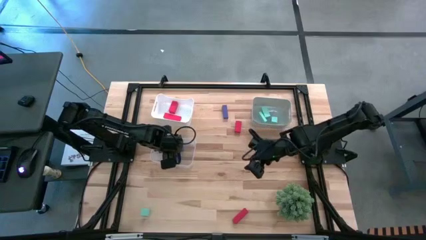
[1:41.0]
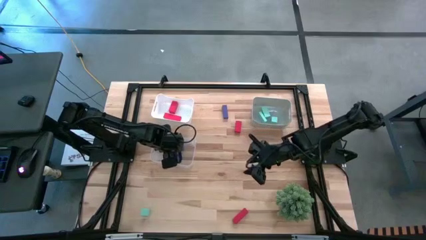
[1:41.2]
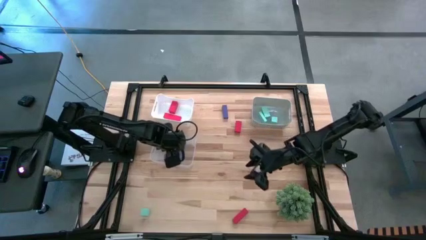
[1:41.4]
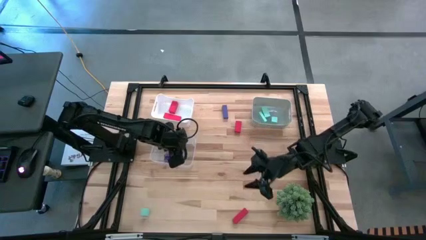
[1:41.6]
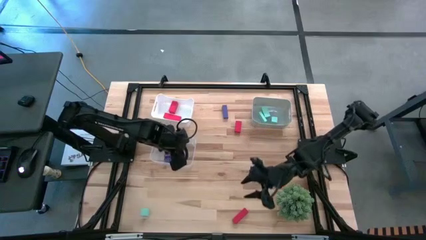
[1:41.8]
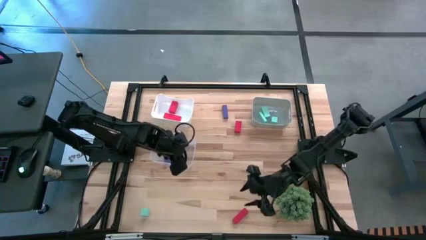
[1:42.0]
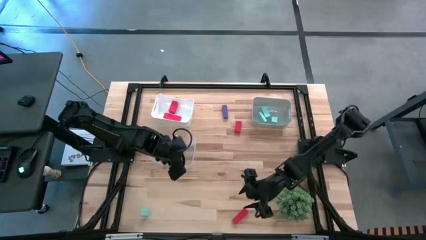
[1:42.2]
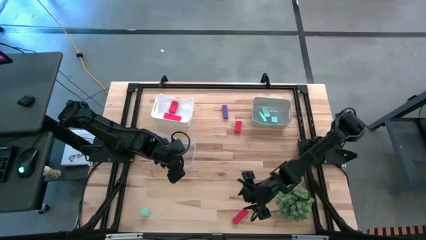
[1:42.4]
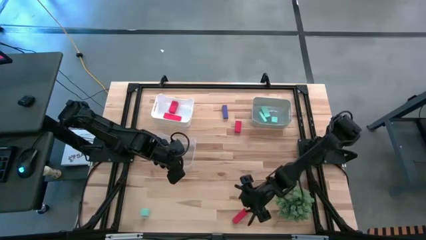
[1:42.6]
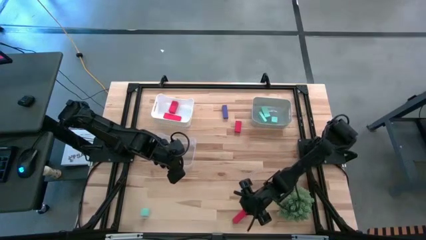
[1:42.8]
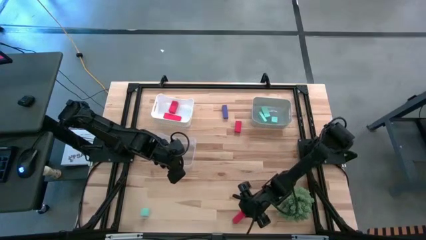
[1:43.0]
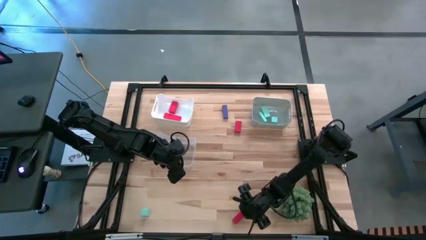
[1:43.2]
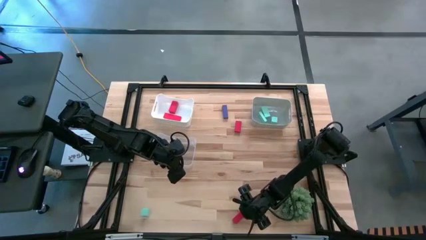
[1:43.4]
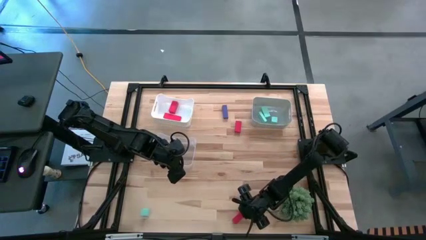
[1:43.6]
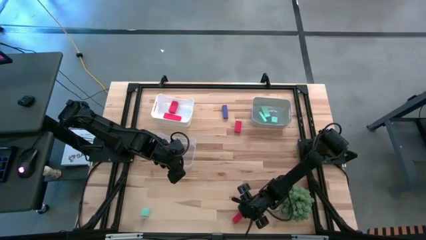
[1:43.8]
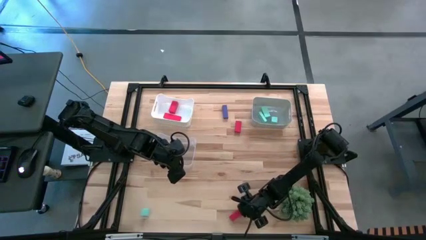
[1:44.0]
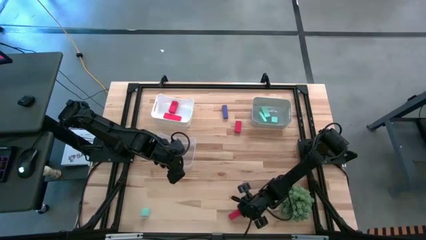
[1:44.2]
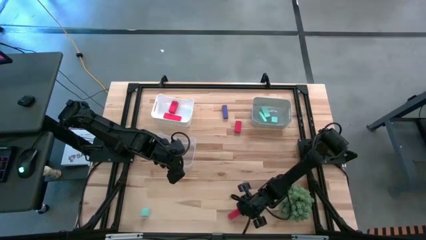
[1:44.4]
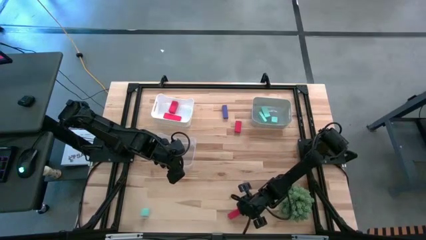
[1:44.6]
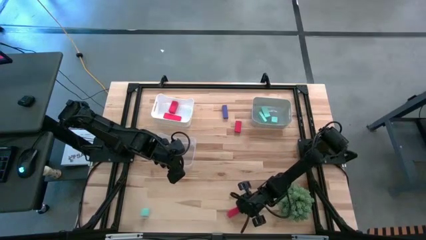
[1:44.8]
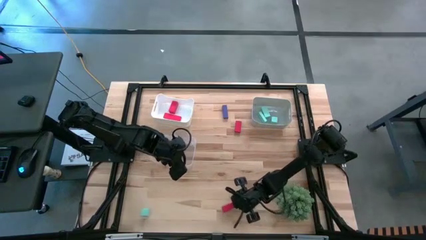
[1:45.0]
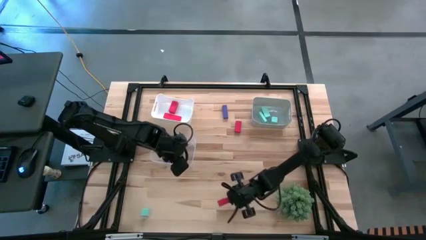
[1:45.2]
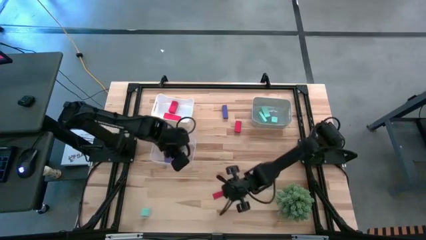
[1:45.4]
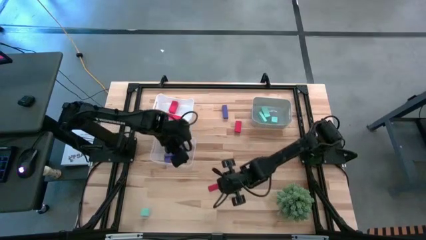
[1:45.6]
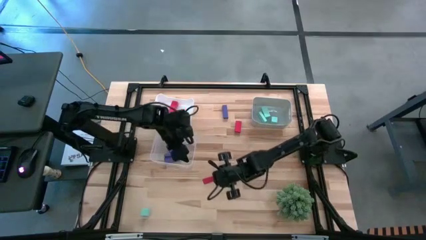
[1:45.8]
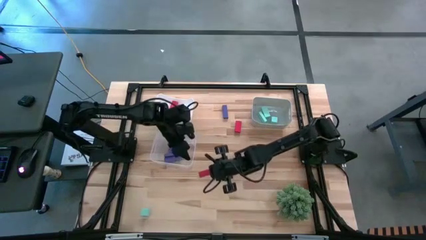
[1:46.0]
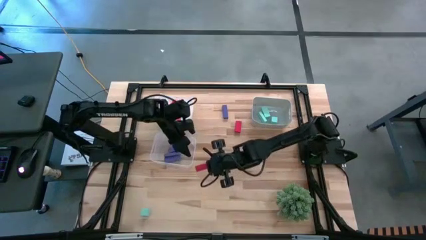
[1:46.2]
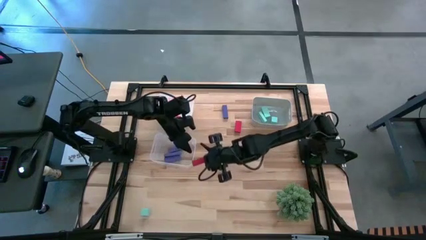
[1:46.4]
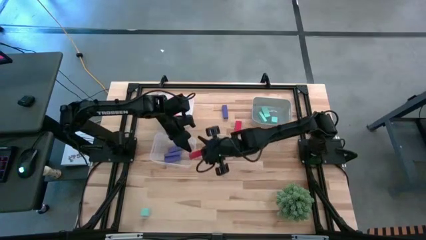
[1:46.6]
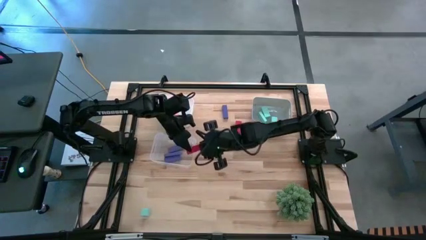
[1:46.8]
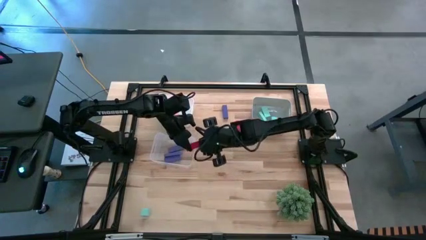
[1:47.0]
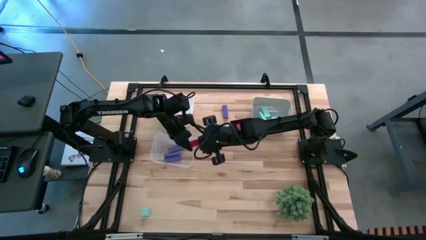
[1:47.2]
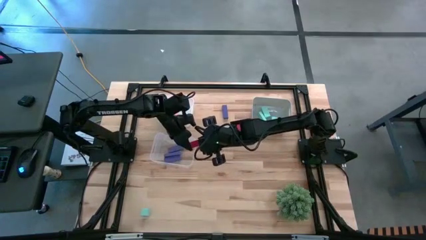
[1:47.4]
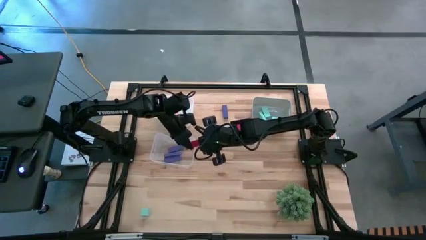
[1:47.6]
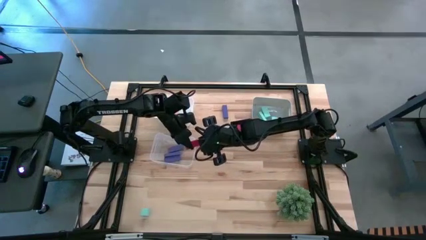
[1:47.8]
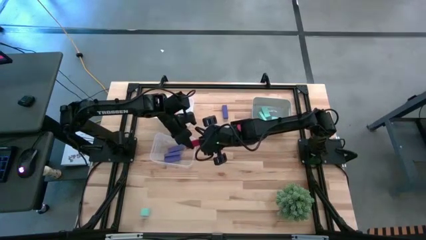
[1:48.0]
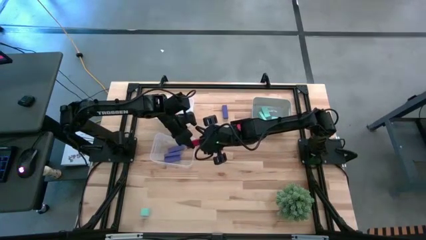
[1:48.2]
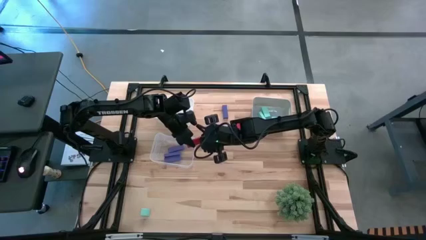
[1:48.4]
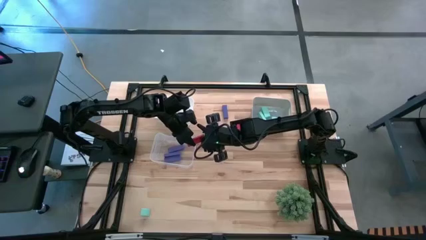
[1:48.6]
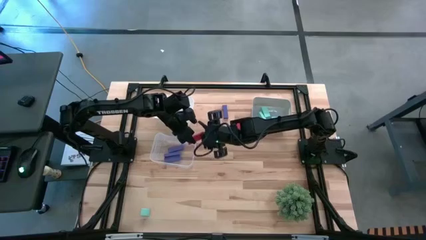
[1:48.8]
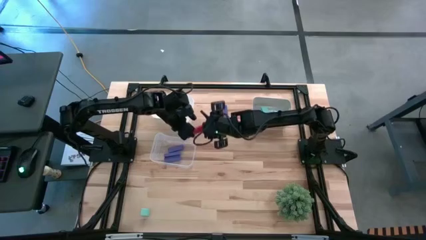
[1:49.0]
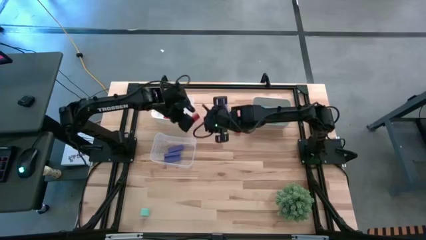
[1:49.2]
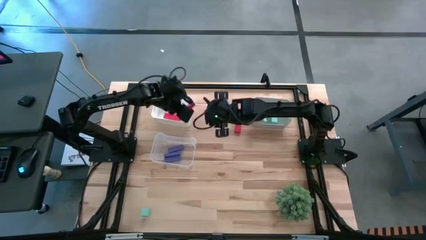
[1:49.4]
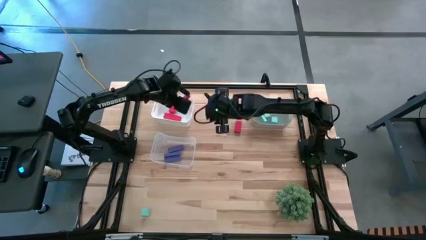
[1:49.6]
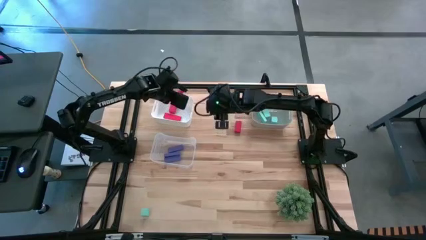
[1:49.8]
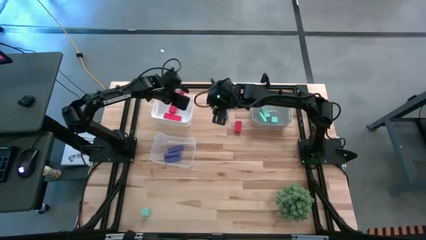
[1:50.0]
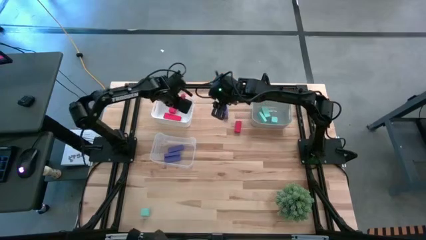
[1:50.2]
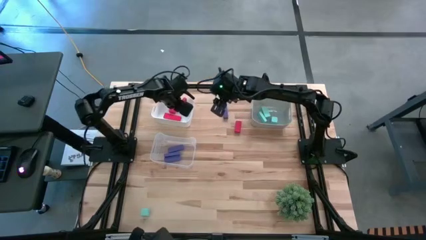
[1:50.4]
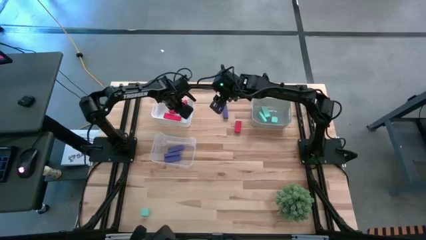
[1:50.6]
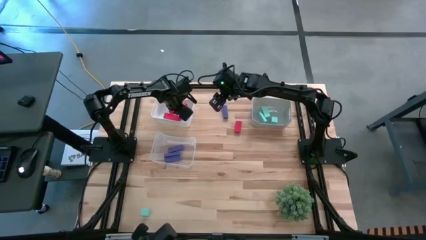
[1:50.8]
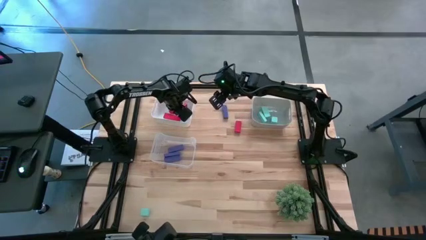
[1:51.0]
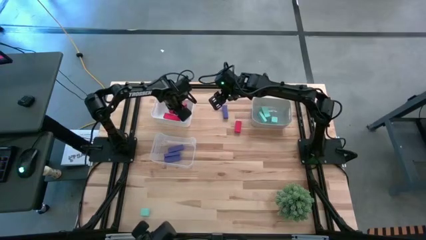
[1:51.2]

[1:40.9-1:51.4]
Task: Sort & place blocks by color
Put the red block into the white bin
